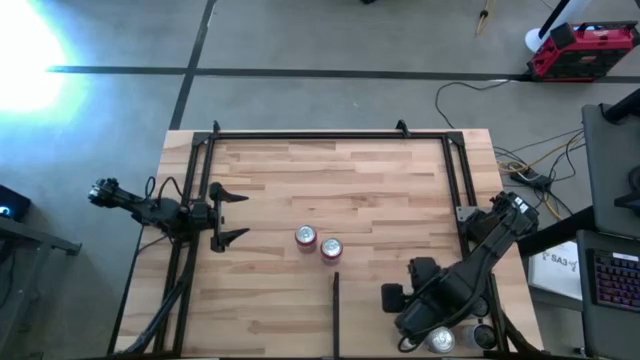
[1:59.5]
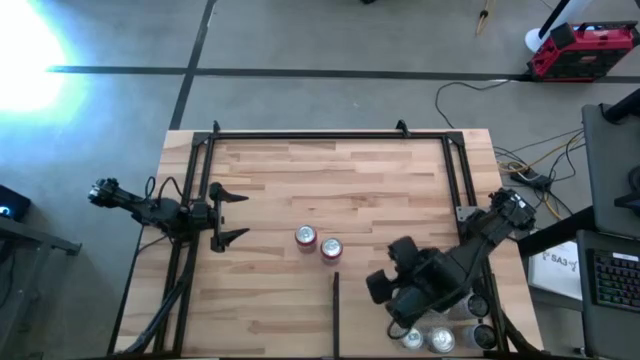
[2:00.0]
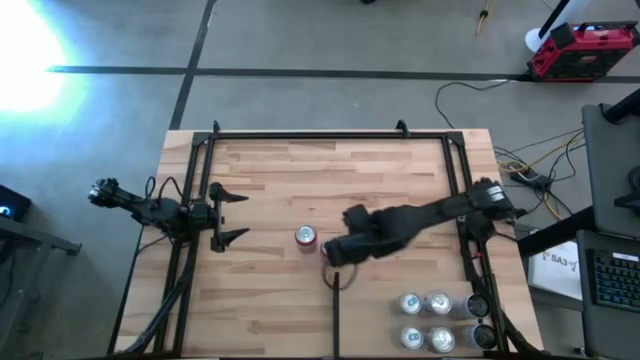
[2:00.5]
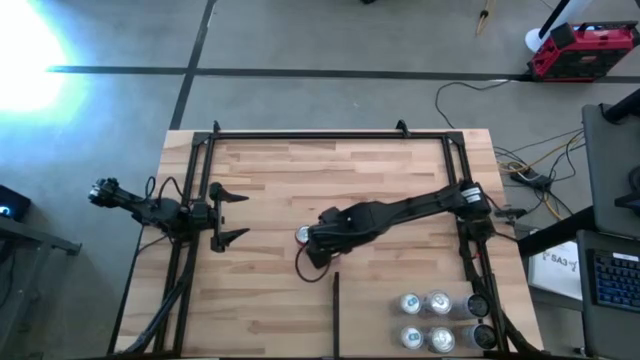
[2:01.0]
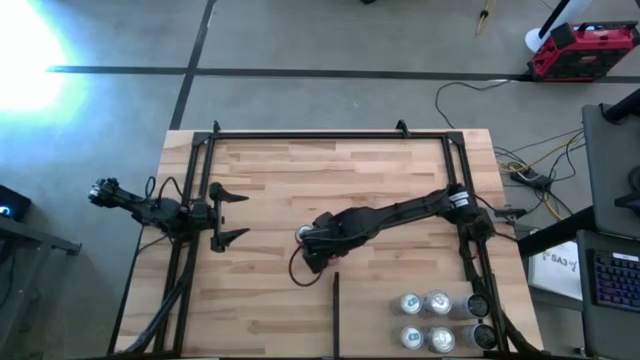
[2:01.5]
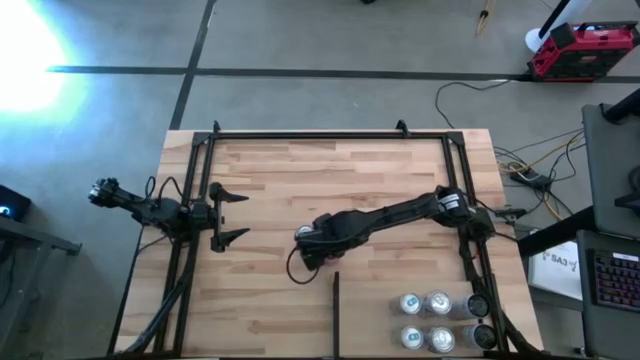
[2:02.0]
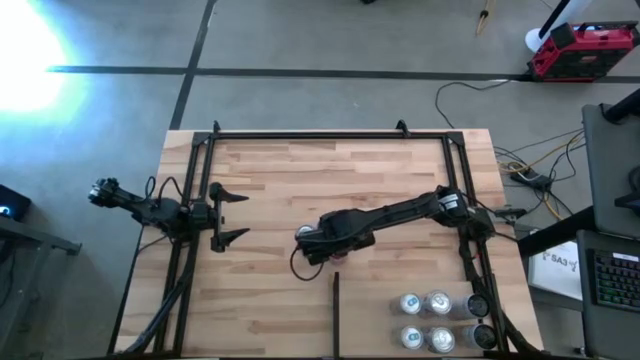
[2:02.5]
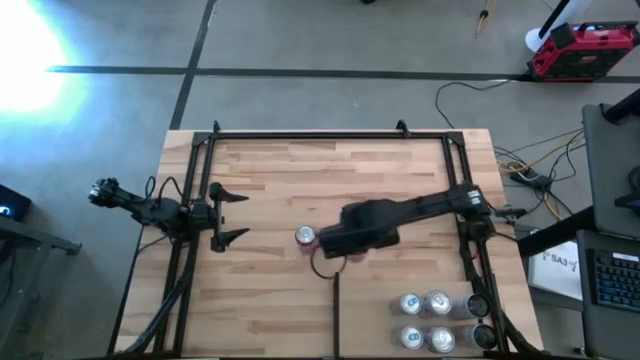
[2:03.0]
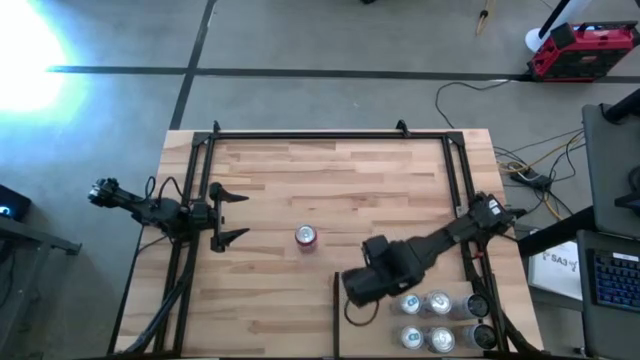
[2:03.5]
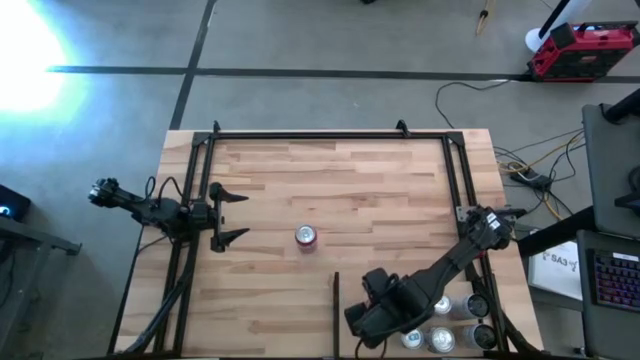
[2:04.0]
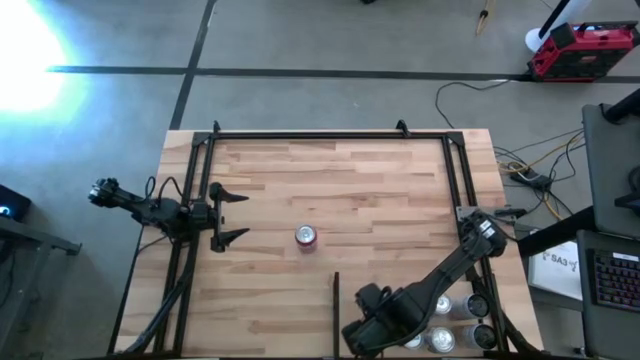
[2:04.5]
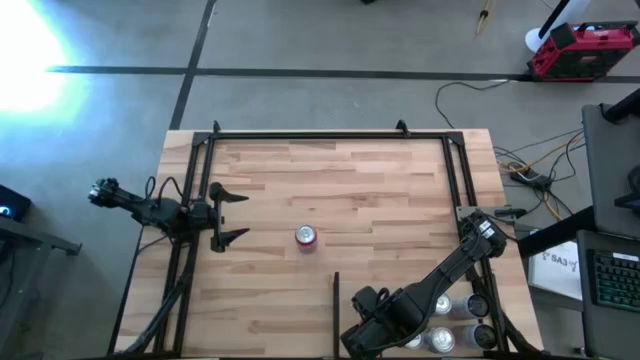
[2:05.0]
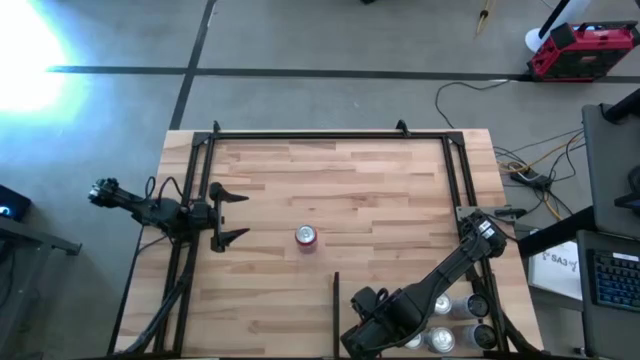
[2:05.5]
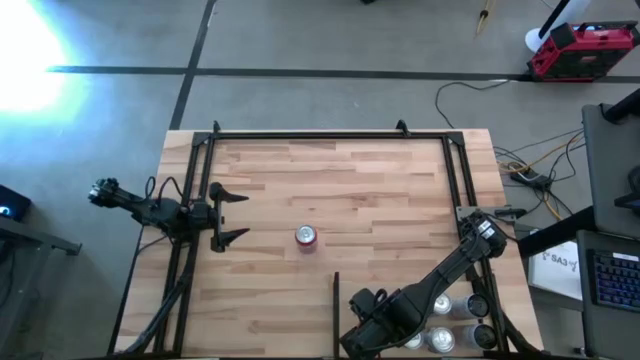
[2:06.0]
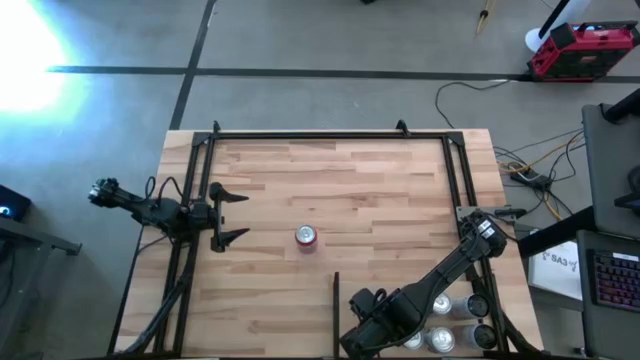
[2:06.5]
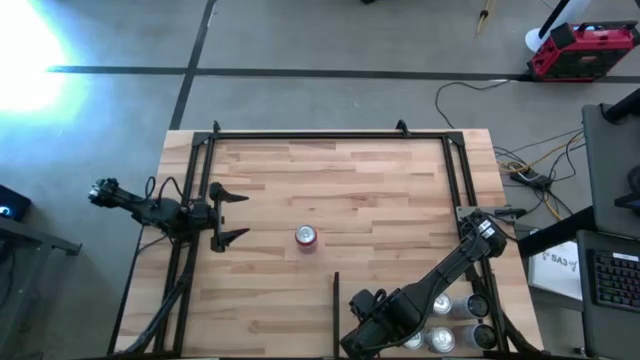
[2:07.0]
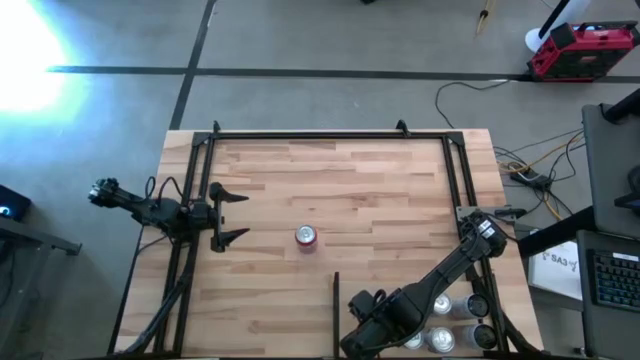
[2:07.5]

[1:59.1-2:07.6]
Task: Place canned beverage on shelf
Put the bottom orange soda can on the shelf

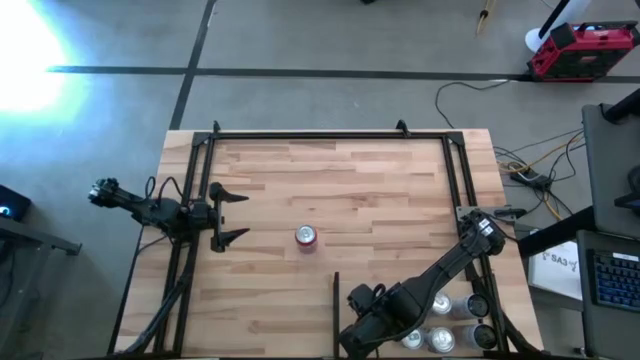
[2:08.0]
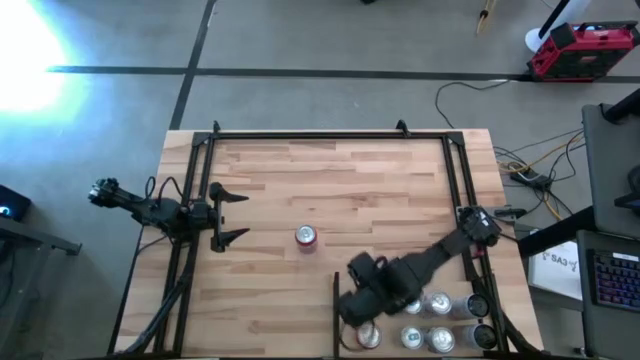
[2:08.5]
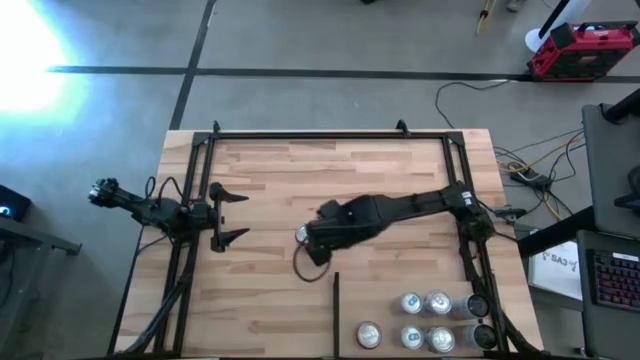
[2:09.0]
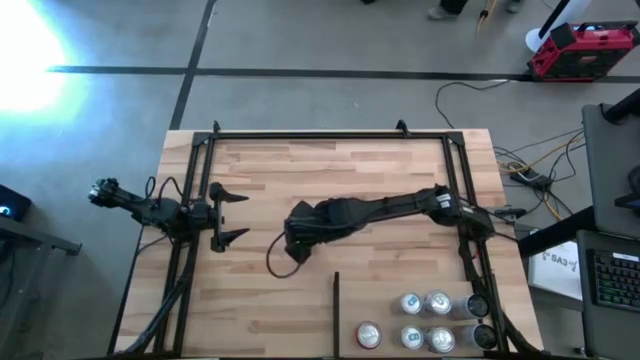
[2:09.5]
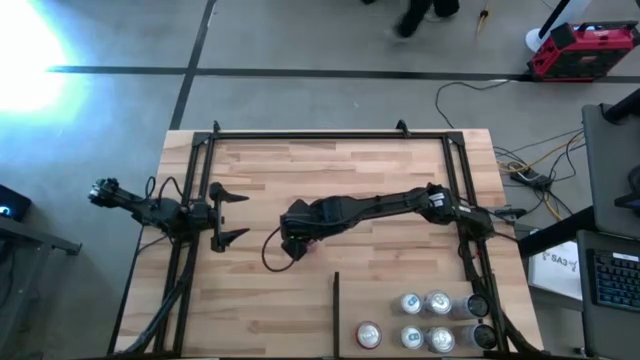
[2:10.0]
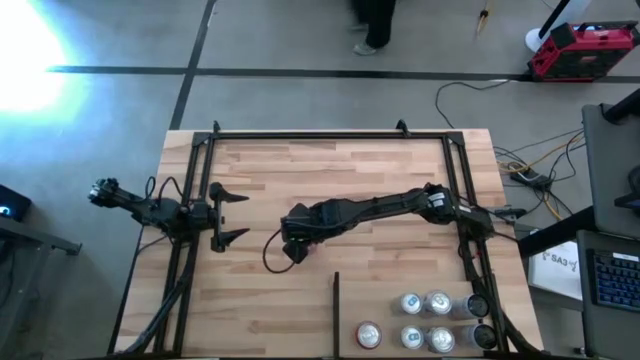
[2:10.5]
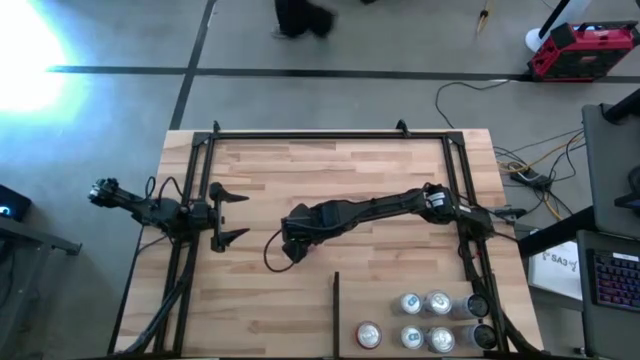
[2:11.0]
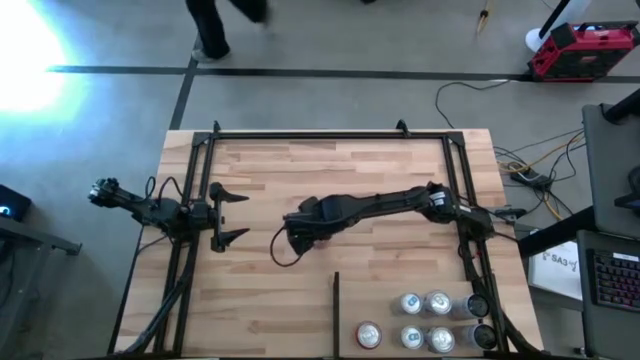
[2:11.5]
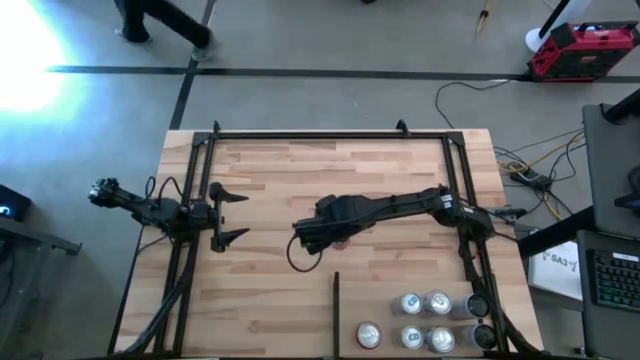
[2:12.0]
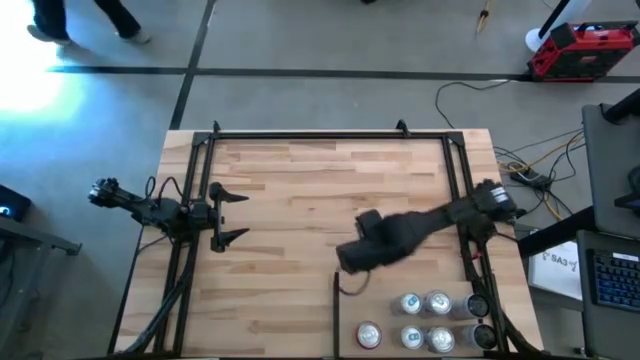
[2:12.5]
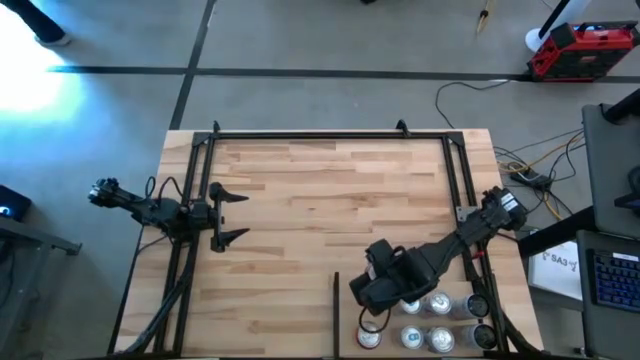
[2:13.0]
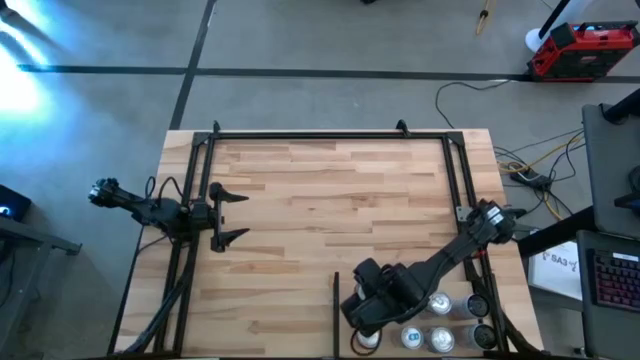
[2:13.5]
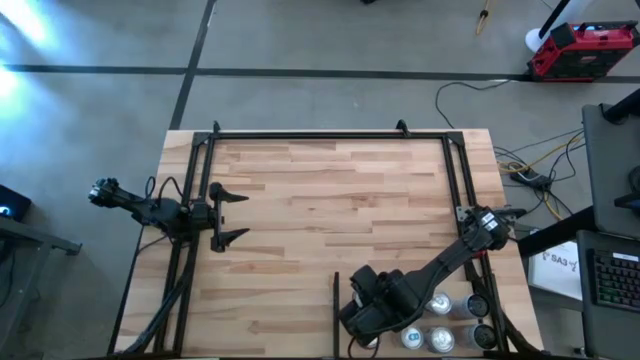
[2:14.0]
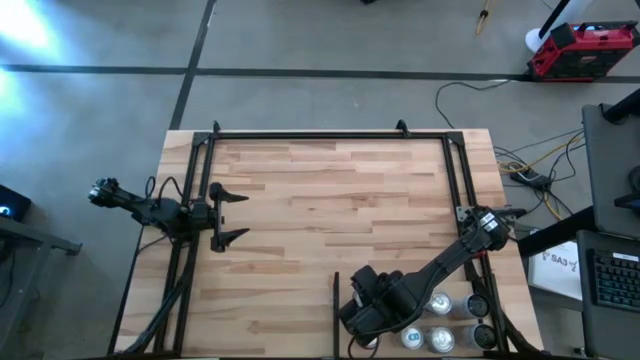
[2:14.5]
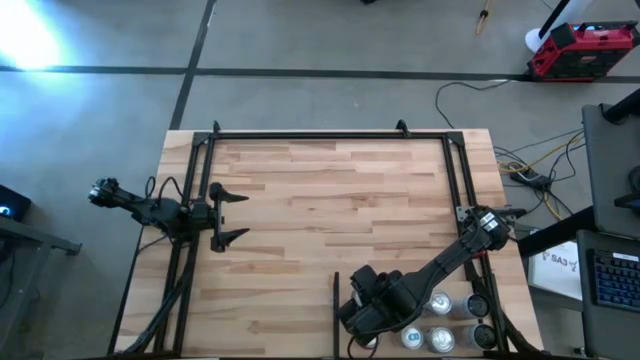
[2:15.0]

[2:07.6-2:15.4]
Put the orange soda can aligned with the orange soda can on the shelf

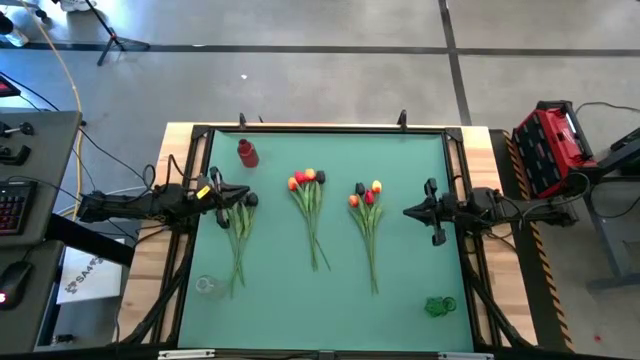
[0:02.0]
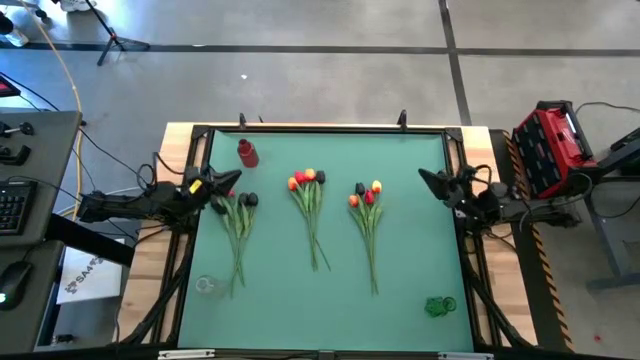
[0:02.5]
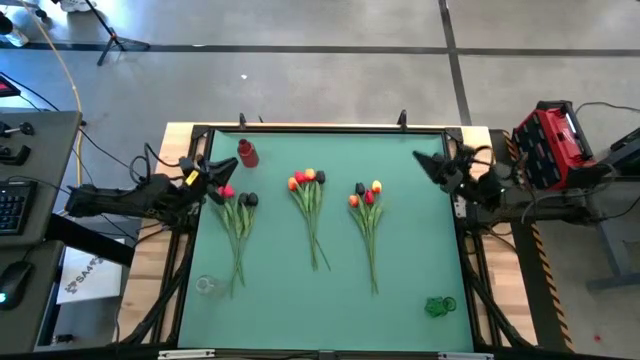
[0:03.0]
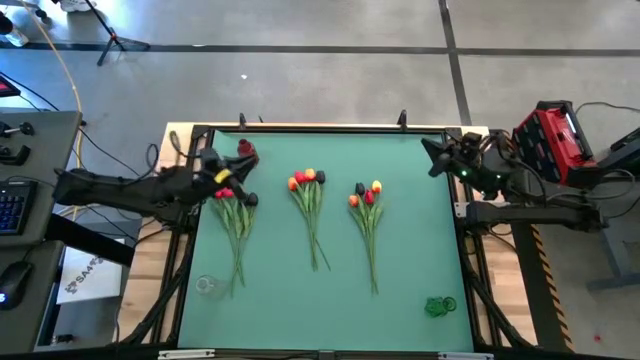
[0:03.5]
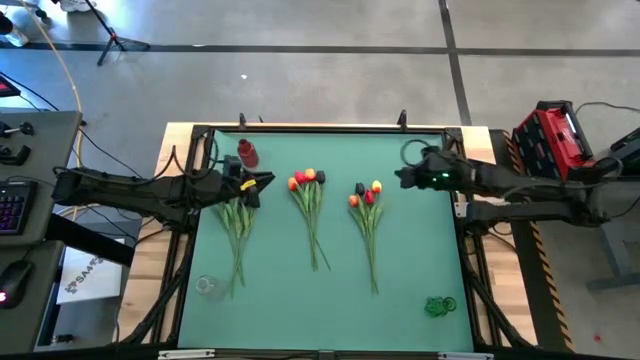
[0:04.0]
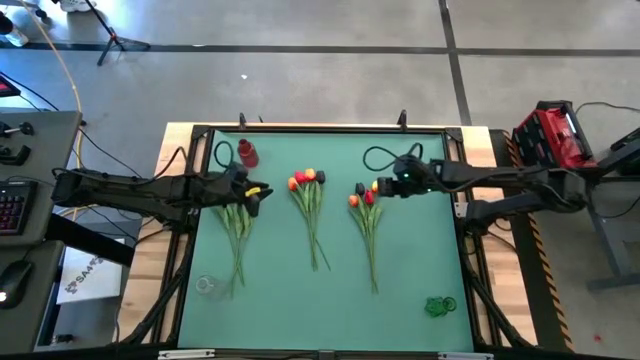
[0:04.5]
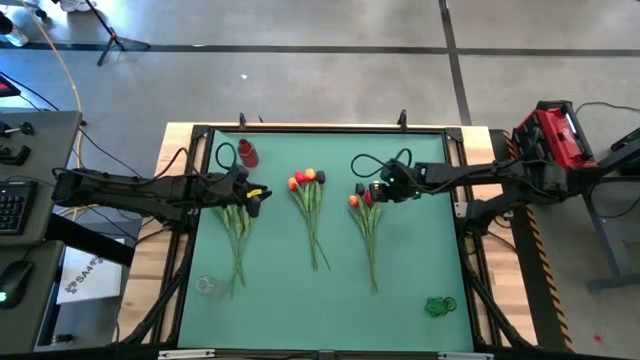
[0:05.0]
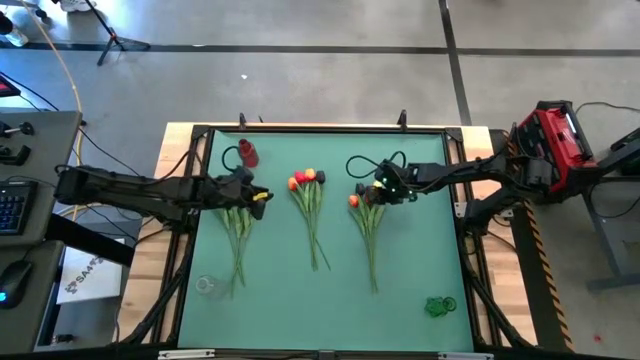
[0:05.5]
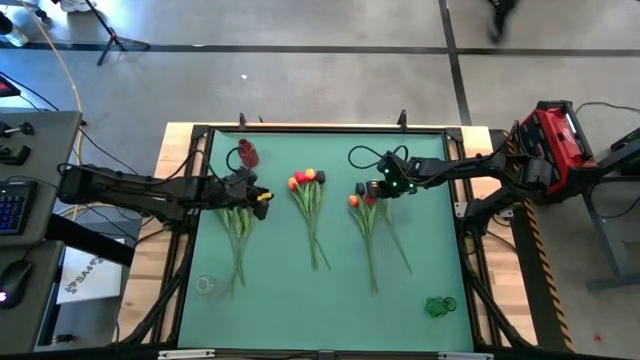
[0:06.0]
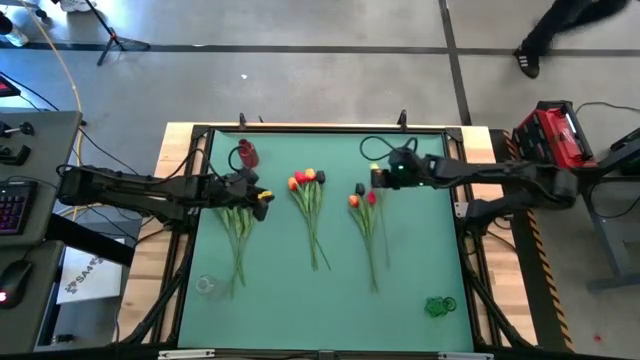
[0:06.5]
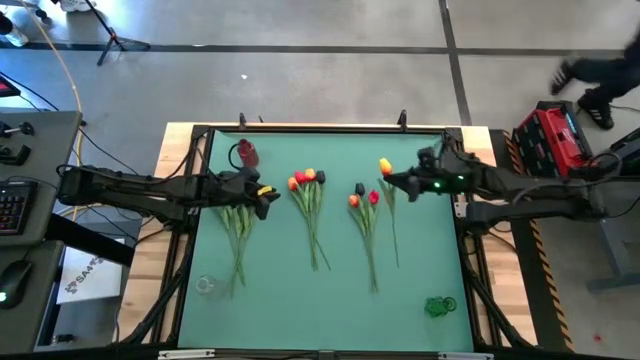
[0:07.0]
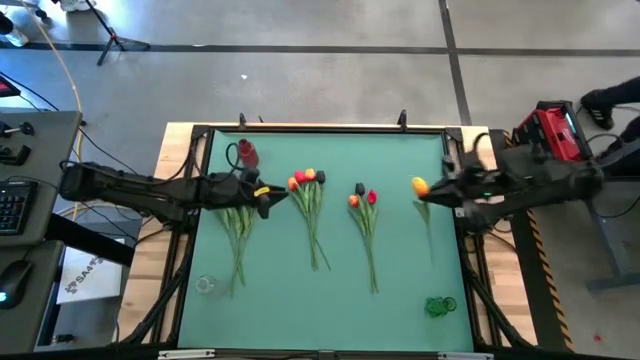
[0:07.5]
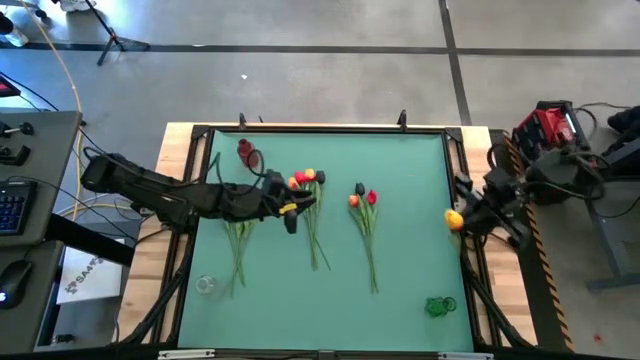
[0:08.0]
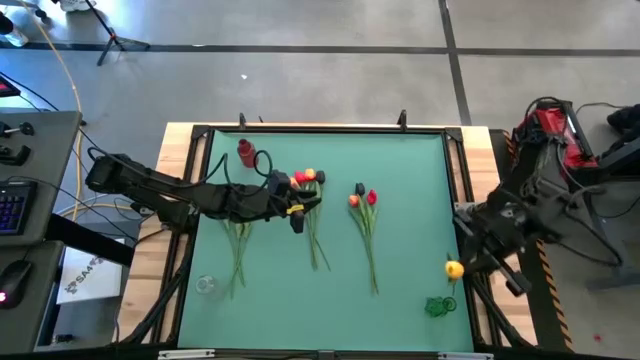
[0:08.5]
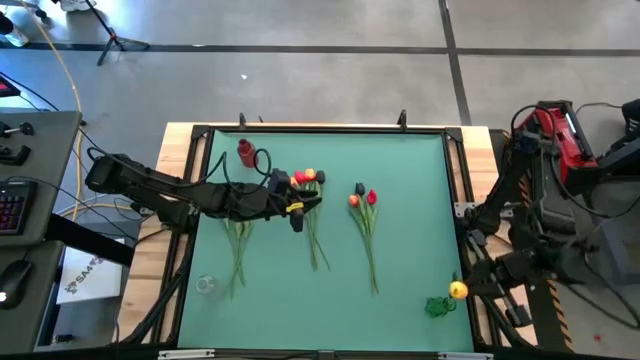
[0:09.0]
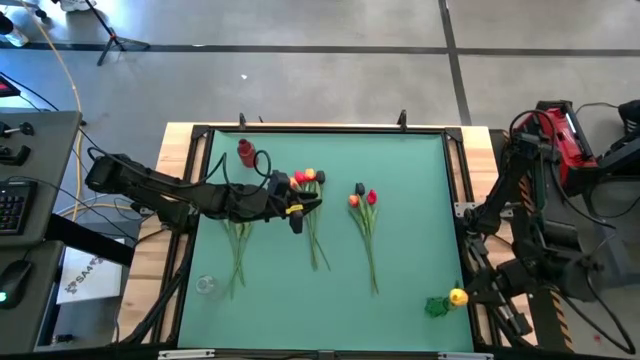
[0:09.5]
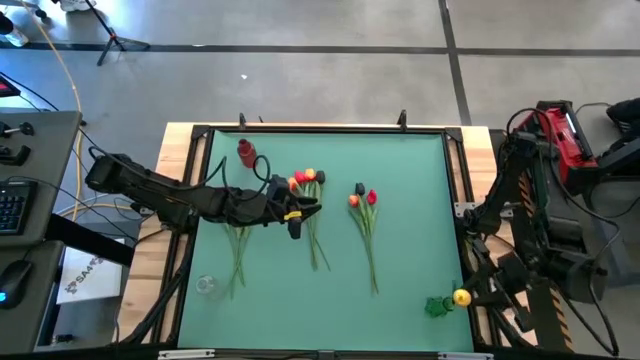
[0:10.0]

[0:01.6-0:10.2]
Task: Sort flowers into vase by color
Put the yellow flower into the green vase
